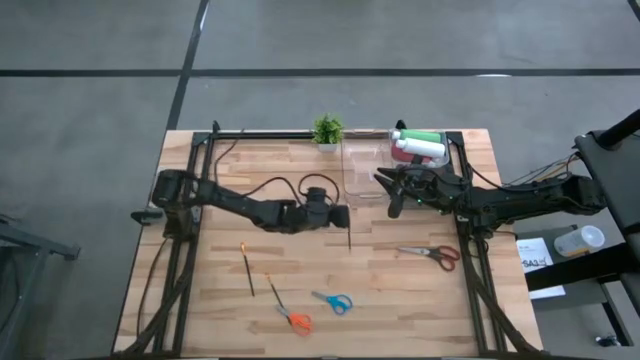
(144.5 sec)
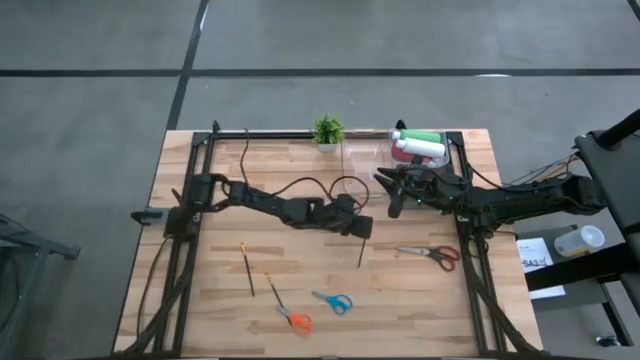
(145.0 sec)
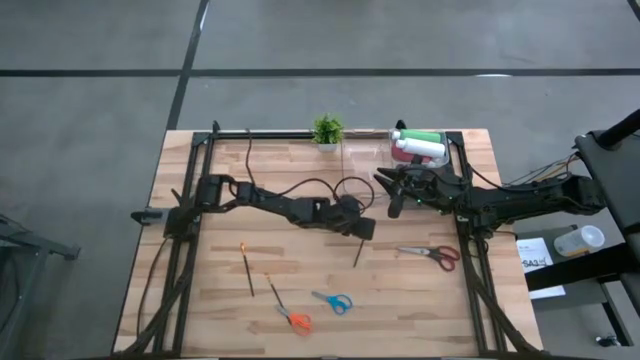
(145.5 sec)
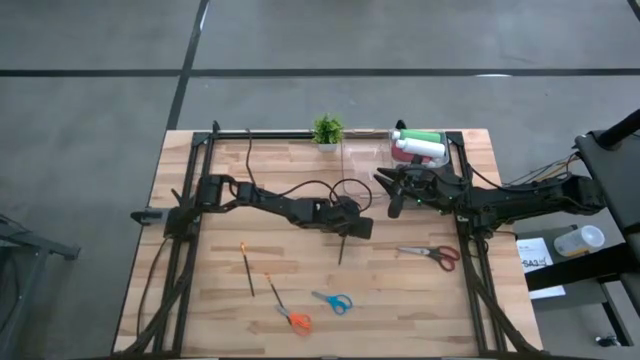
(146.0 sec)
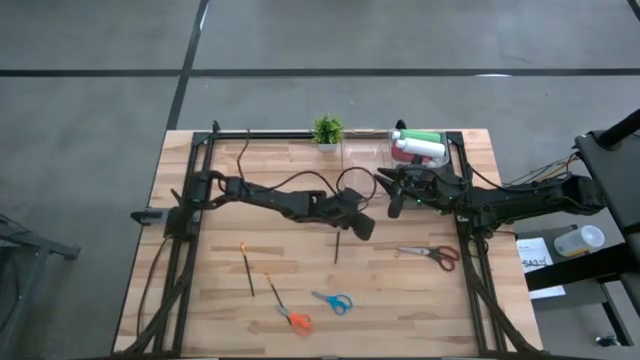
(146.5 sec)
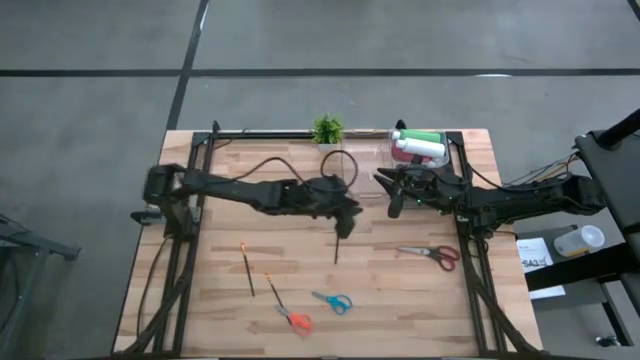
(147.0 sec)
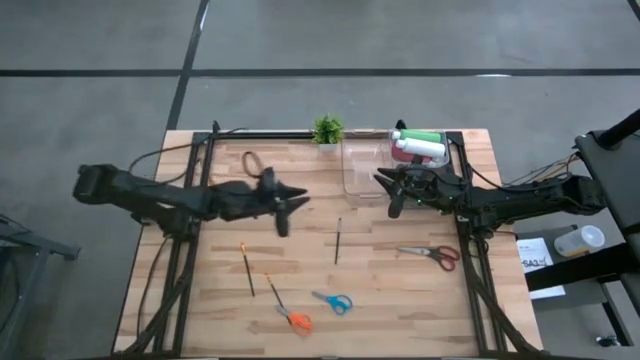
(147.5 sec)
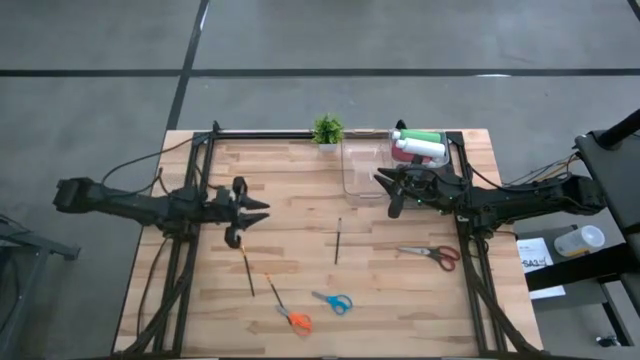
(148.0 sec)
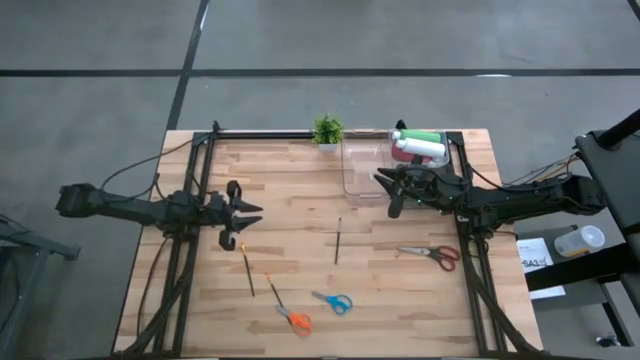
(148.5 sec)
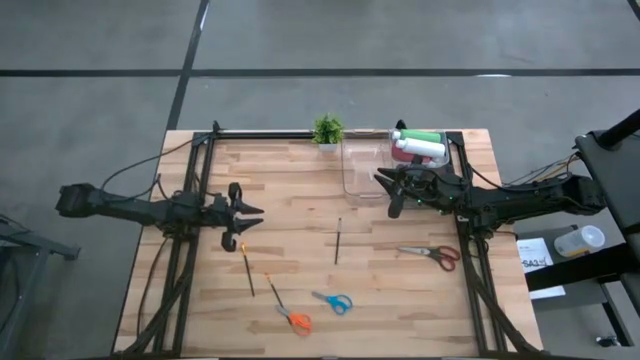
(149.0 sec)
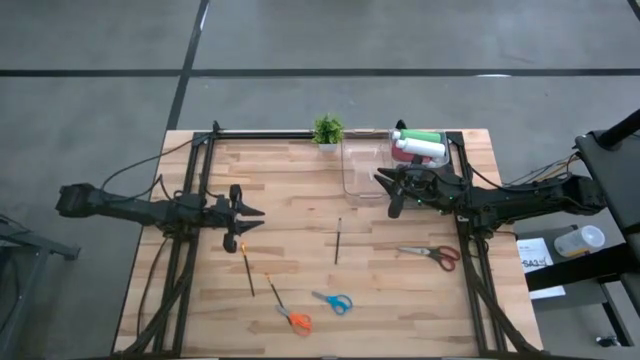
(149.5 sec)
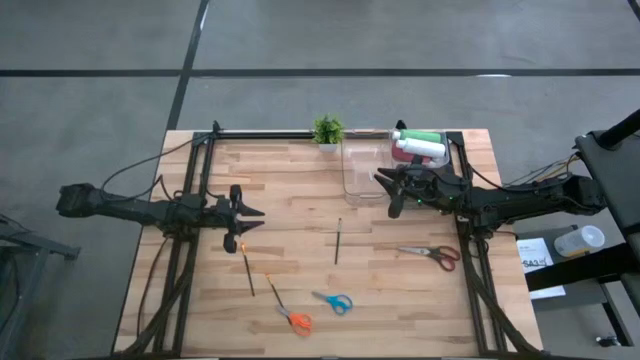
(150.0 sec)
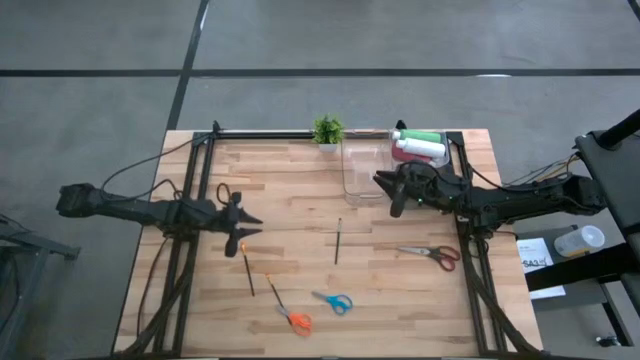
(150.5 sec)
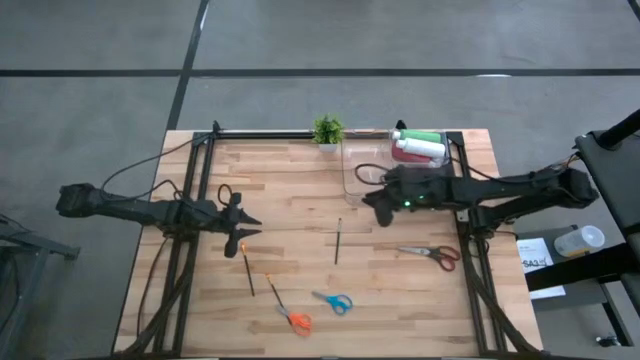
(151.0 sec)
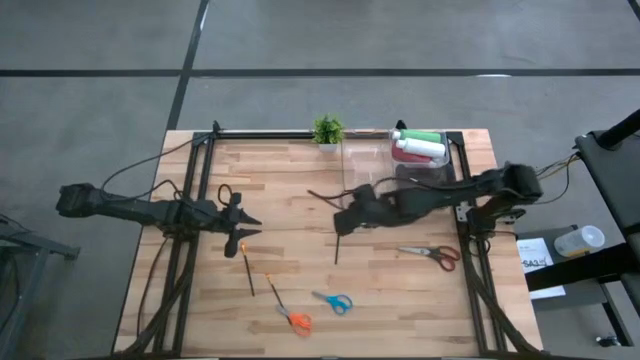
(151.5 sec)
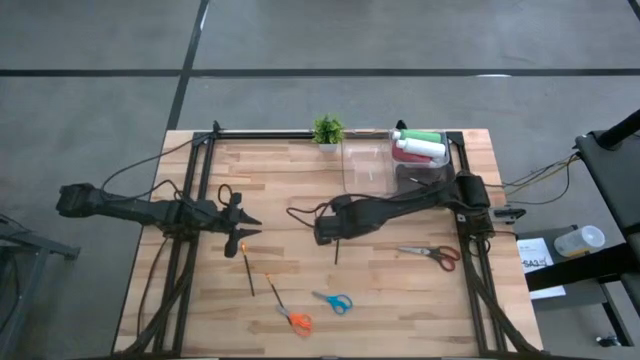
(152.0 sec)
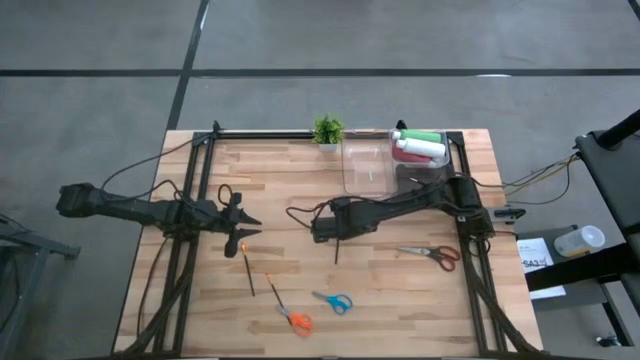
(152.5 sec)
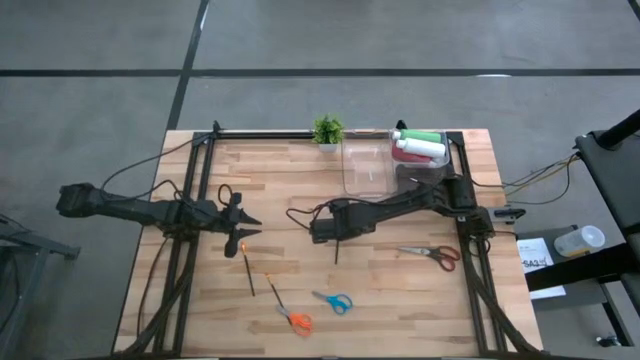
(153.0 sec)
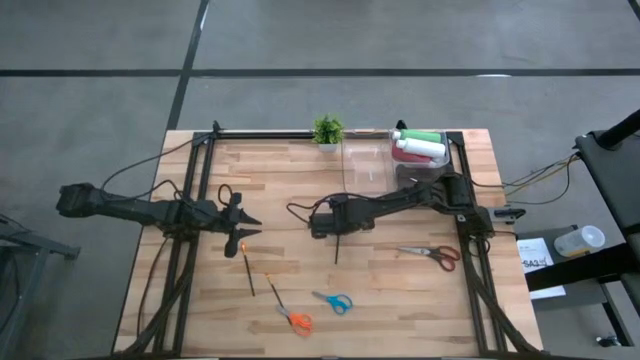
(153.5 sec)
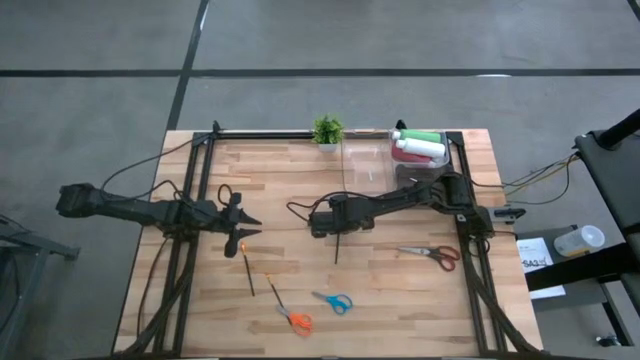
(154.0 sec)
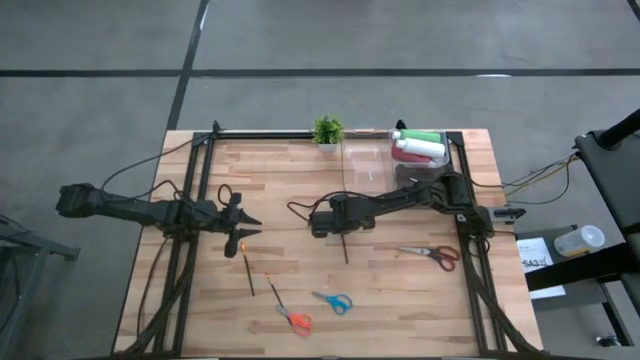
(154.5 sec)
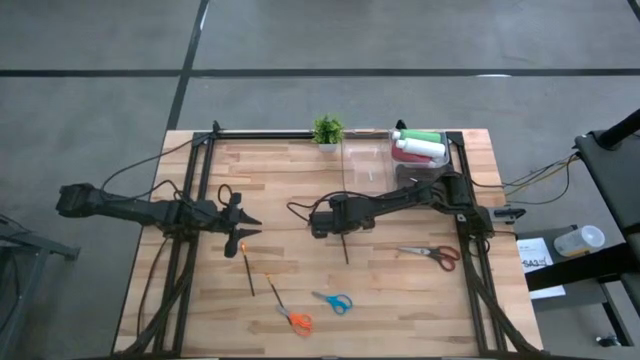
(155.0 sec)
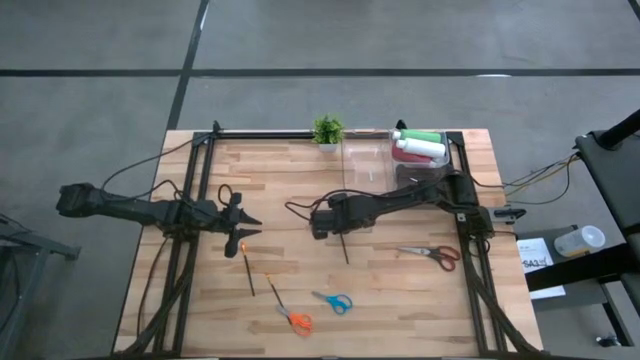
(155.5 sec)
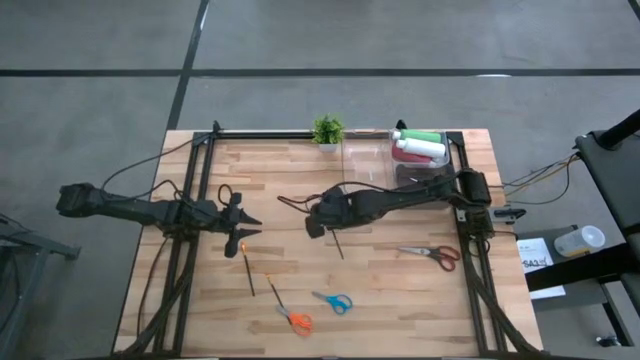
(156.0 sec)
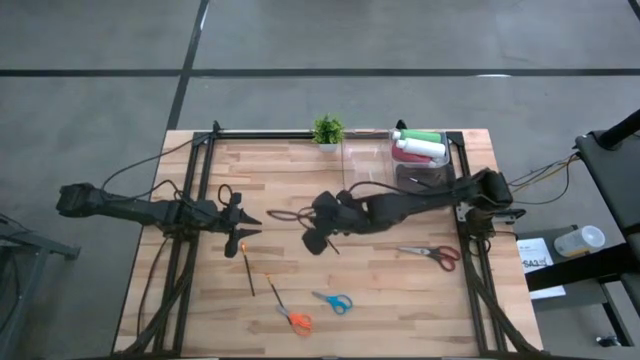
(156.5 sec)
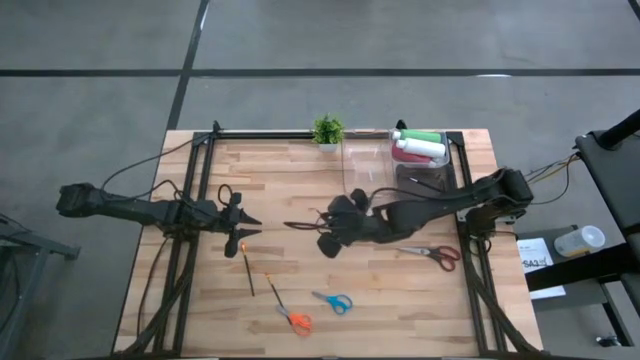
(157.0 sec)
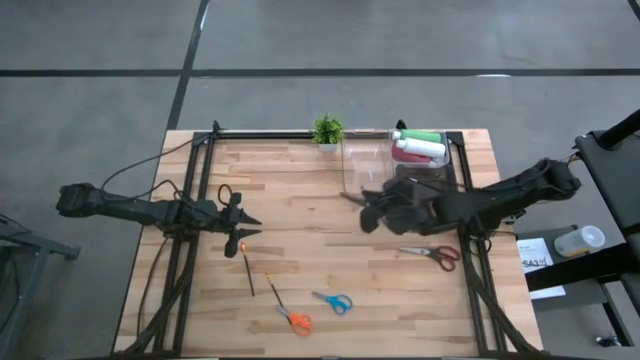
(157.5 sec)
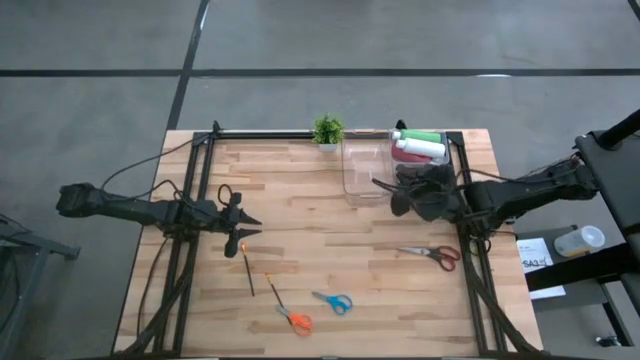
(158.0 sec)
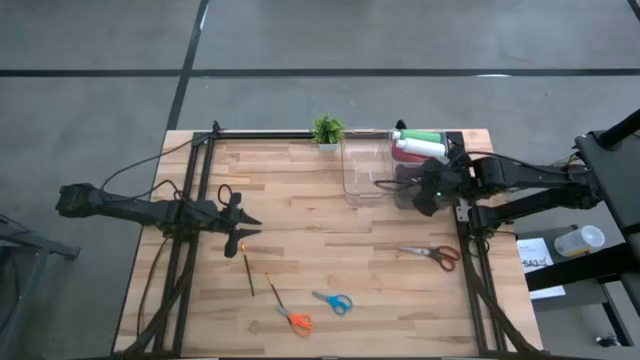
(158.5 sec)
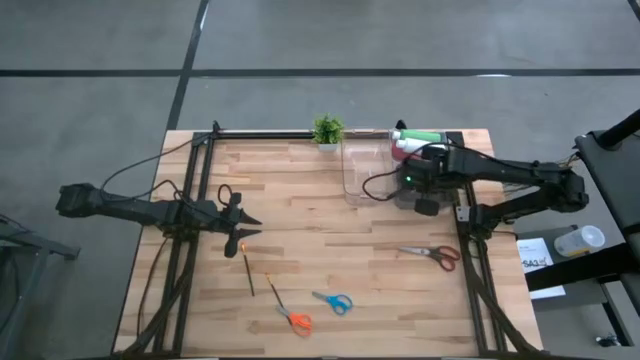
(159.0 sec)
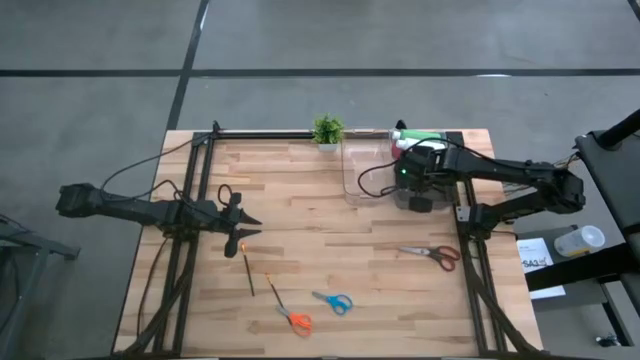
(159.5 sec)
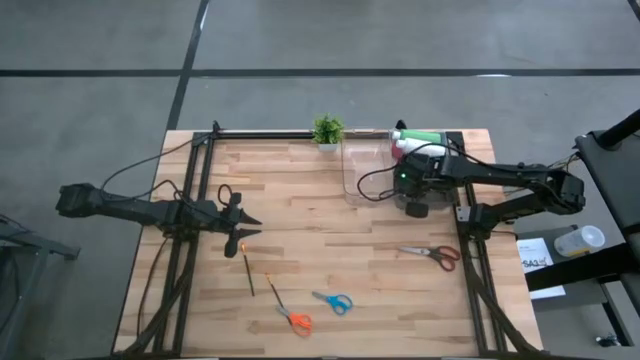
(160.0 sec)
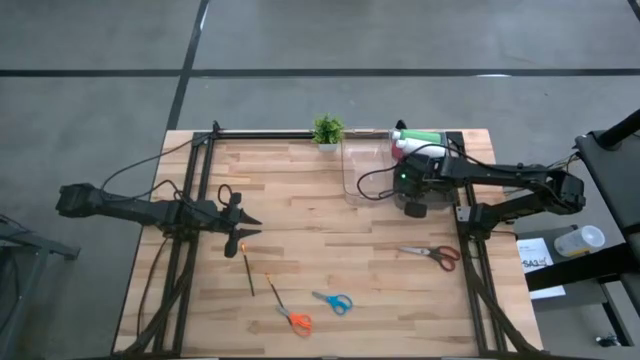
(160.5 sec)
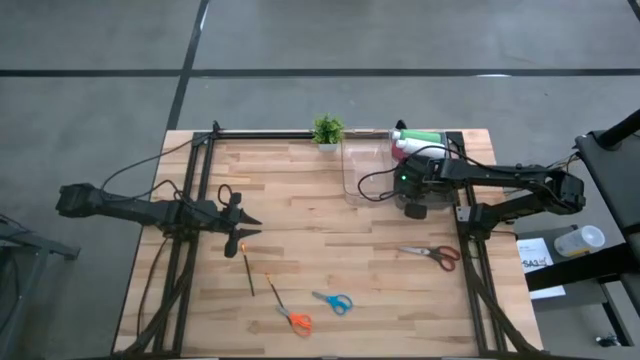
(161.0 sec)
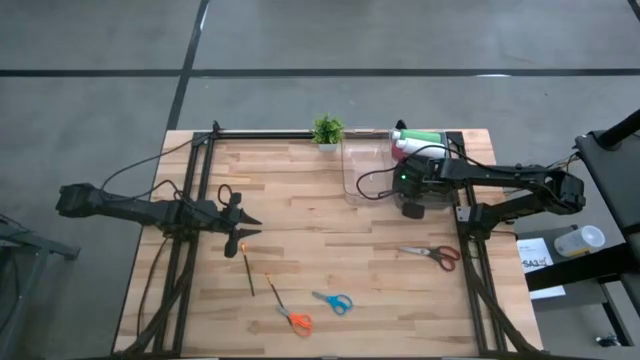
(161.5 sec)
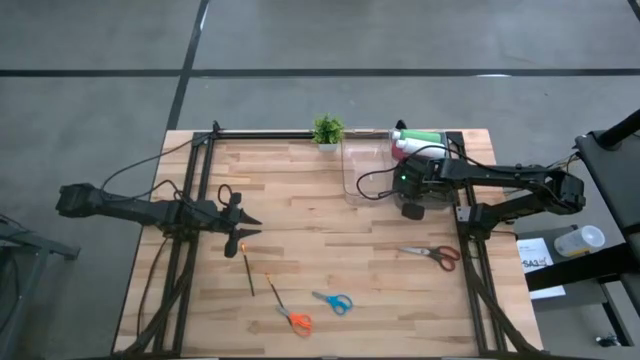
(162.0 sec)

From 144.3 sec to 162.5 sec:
Task: Pick & Place Paint Supplies
Put the silver paintbrush into the black bin
